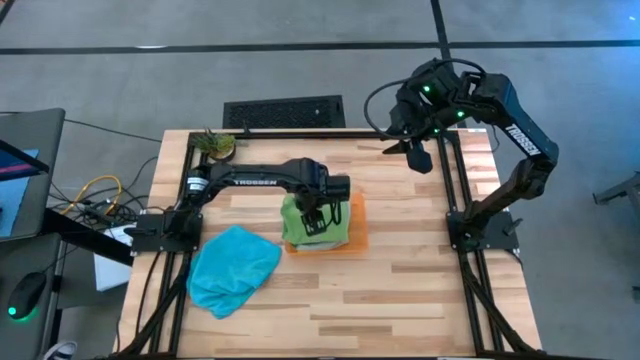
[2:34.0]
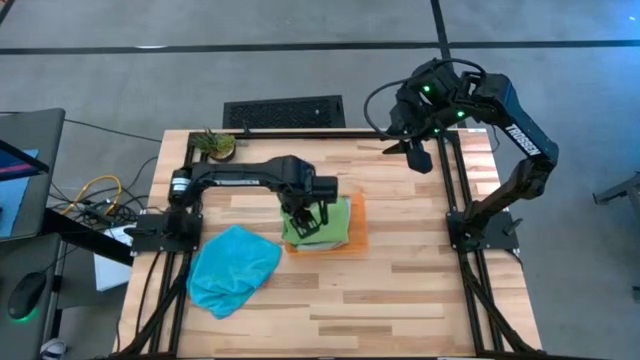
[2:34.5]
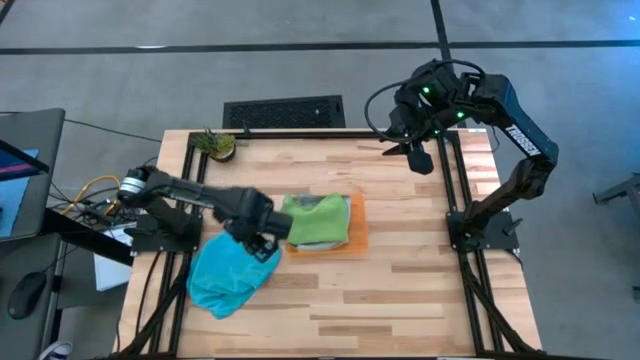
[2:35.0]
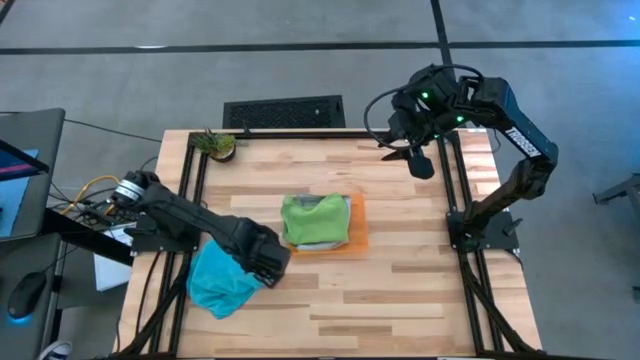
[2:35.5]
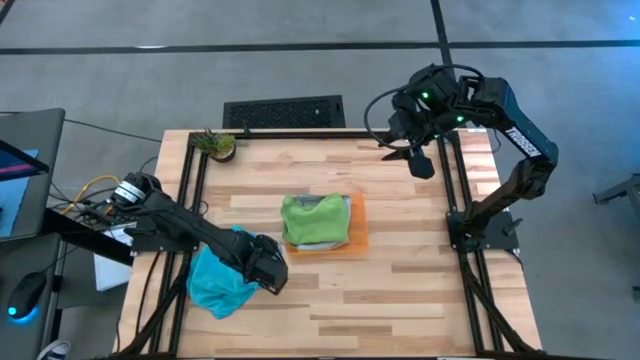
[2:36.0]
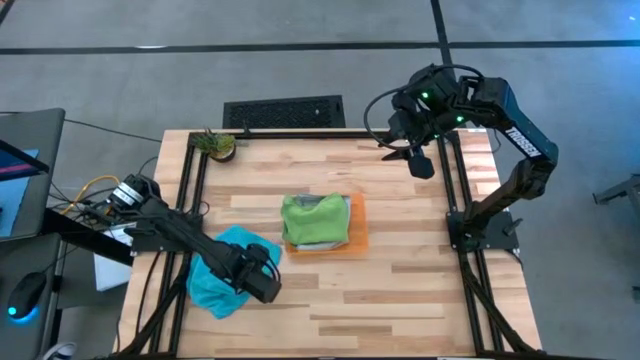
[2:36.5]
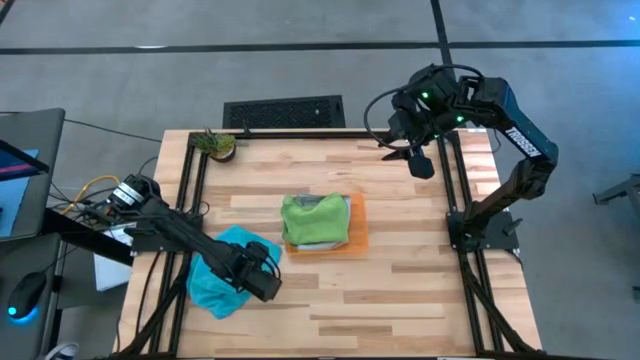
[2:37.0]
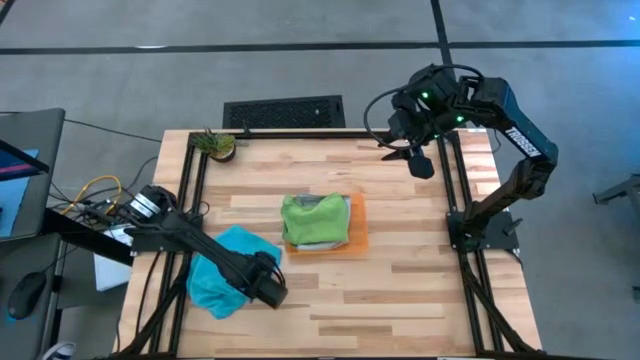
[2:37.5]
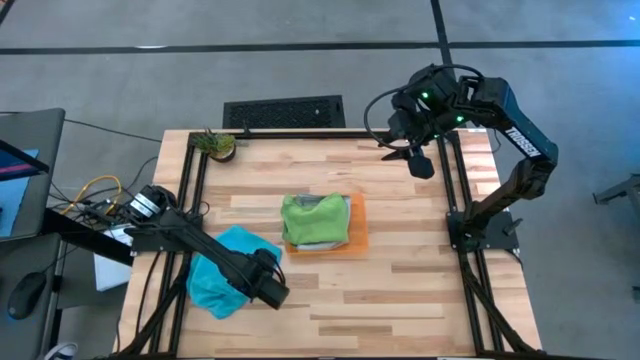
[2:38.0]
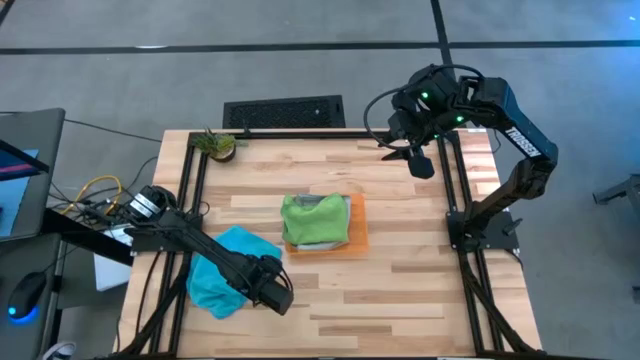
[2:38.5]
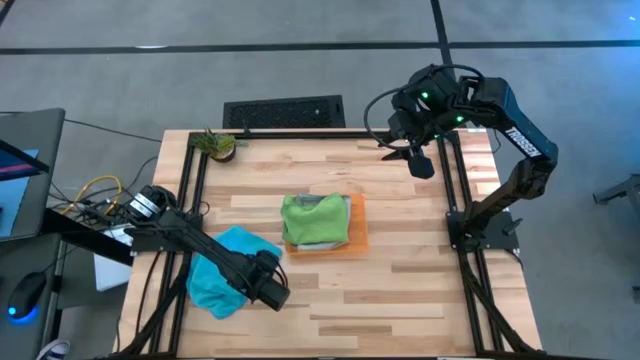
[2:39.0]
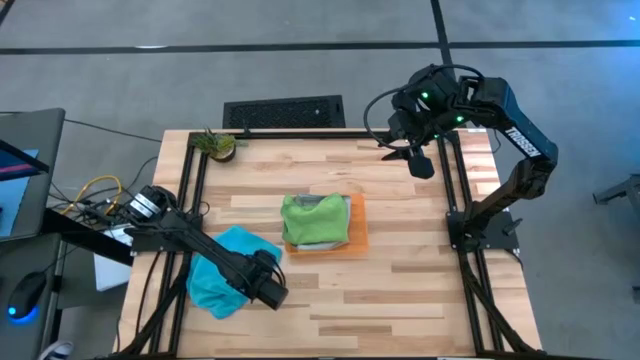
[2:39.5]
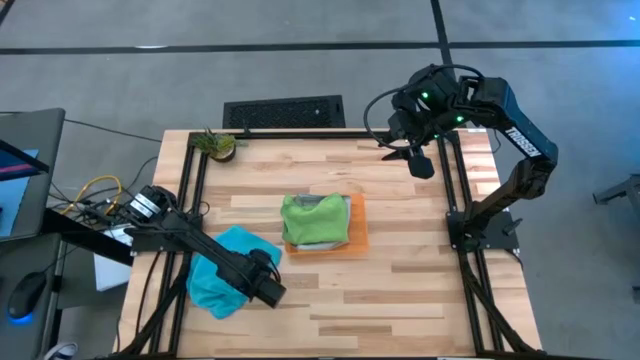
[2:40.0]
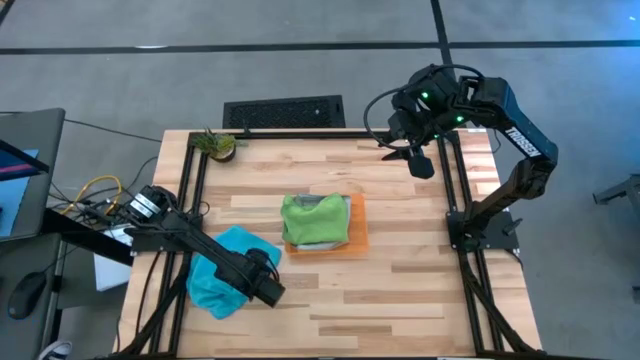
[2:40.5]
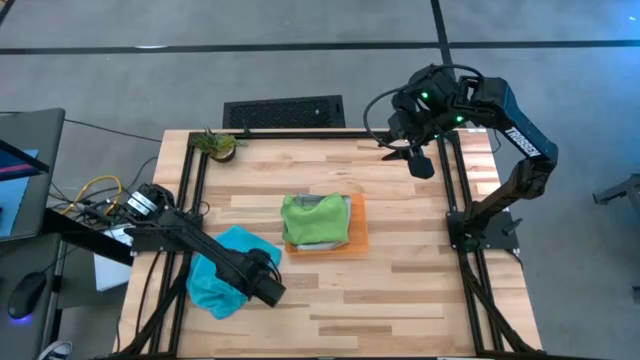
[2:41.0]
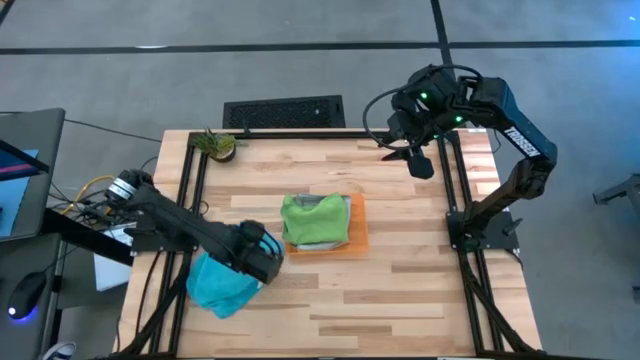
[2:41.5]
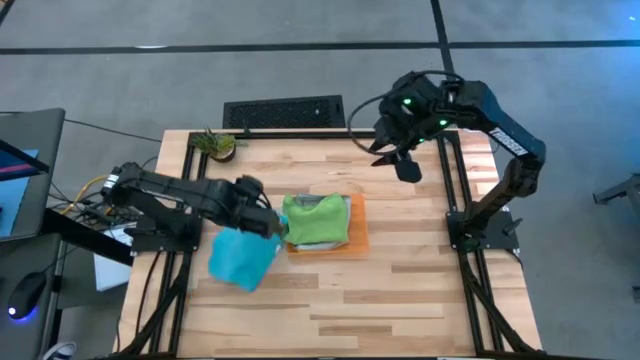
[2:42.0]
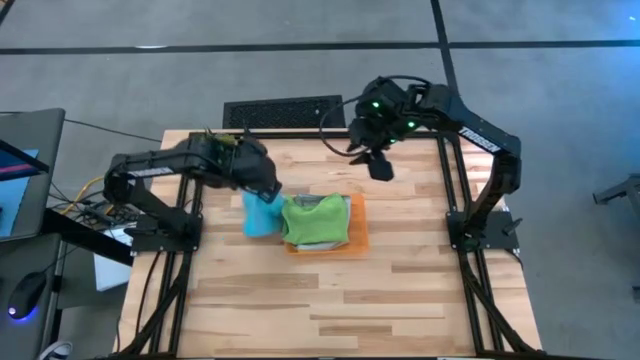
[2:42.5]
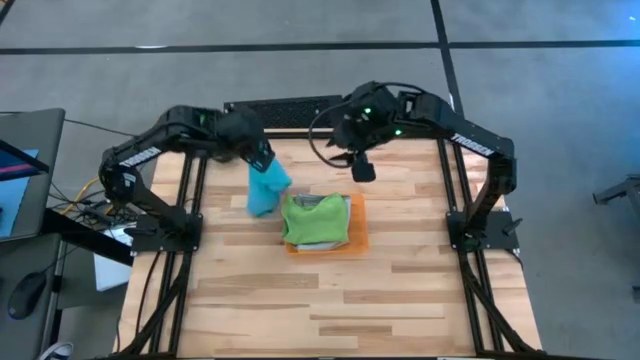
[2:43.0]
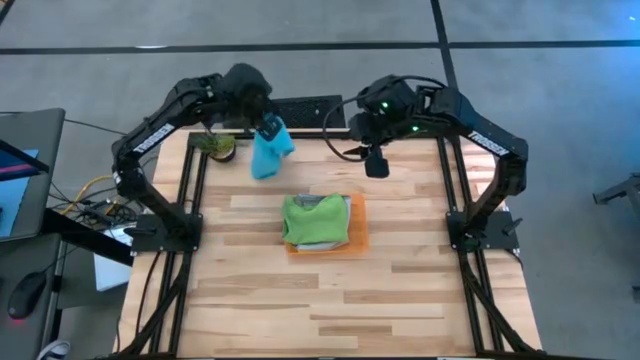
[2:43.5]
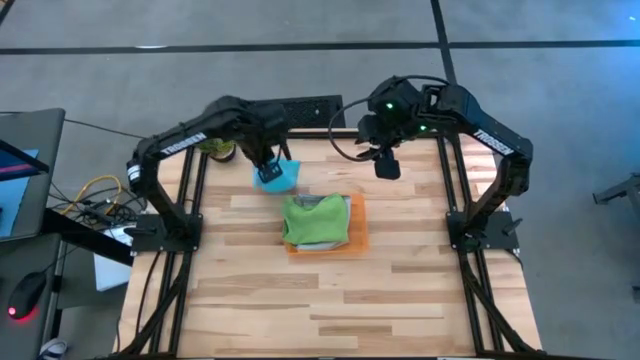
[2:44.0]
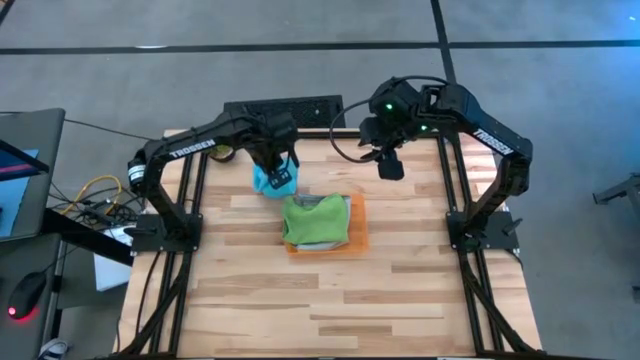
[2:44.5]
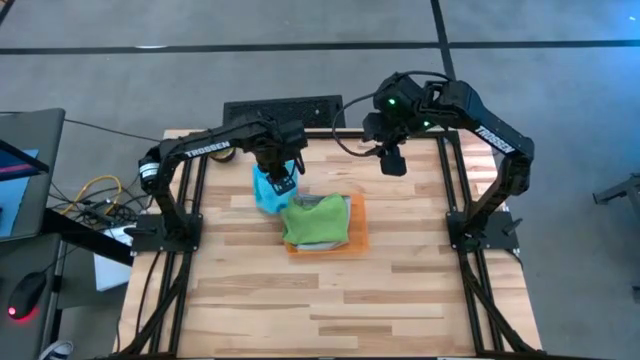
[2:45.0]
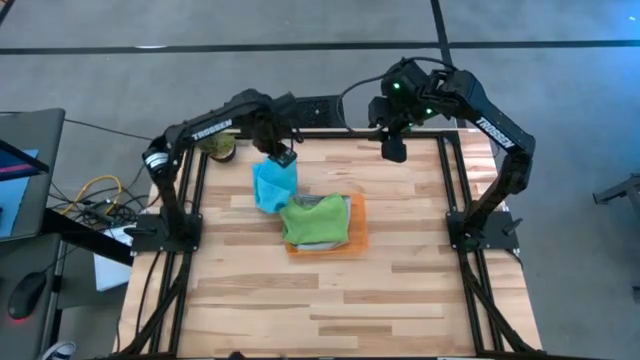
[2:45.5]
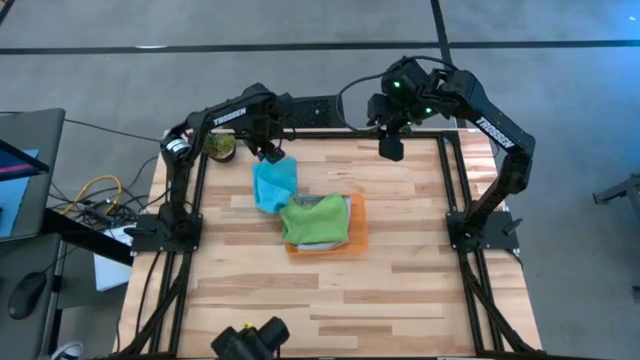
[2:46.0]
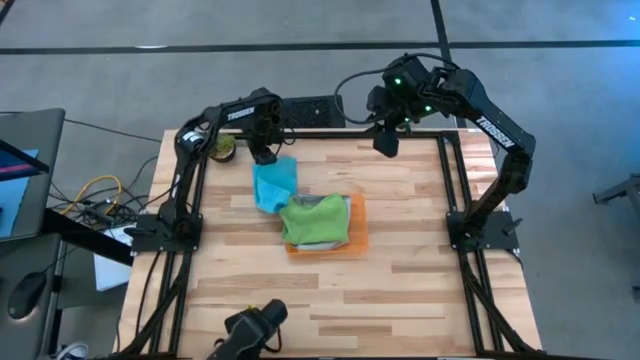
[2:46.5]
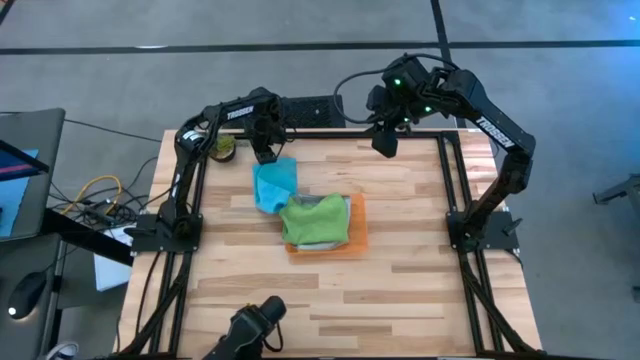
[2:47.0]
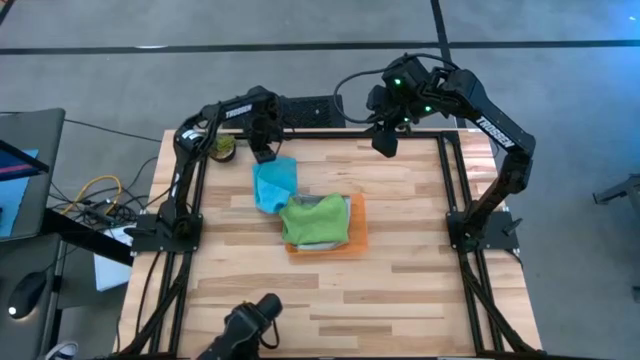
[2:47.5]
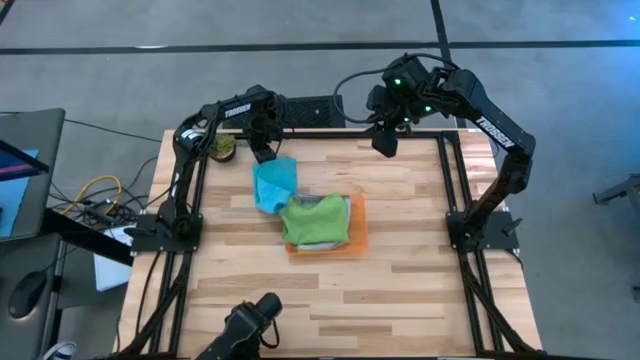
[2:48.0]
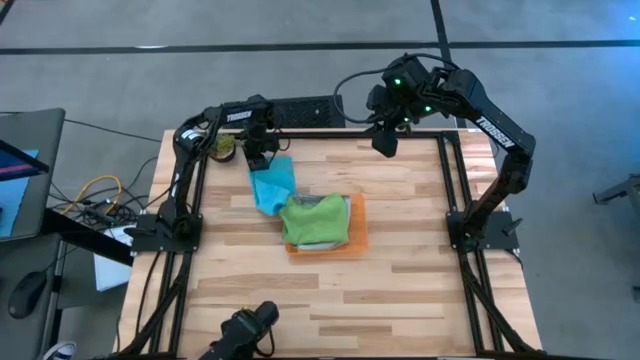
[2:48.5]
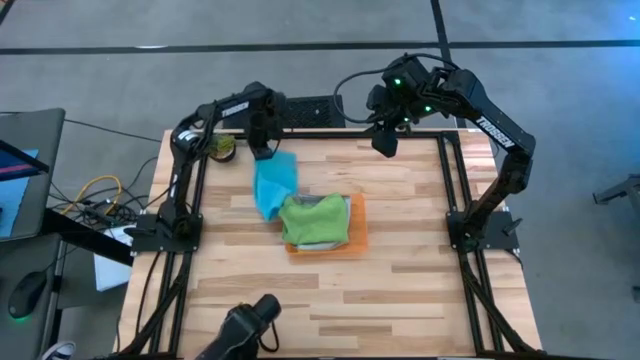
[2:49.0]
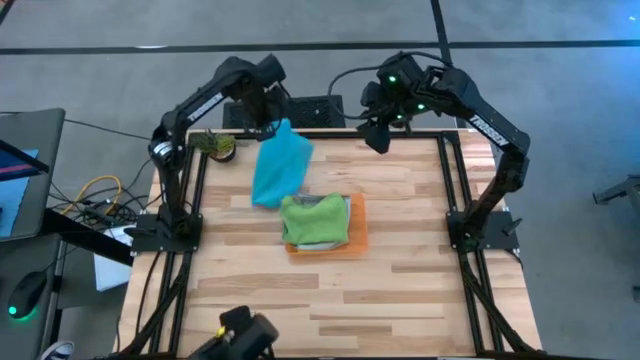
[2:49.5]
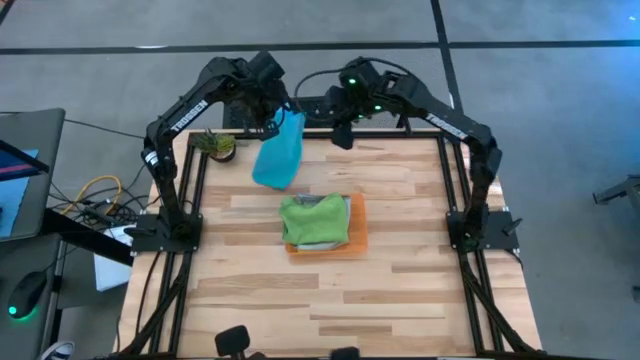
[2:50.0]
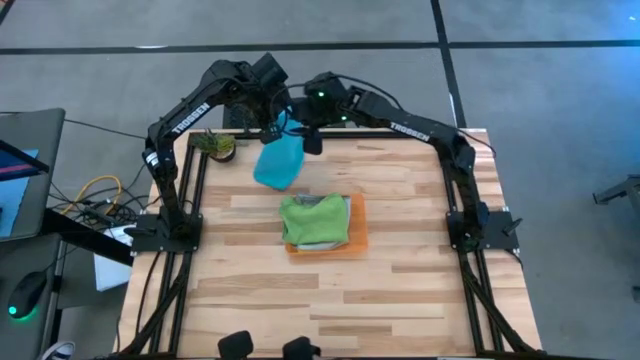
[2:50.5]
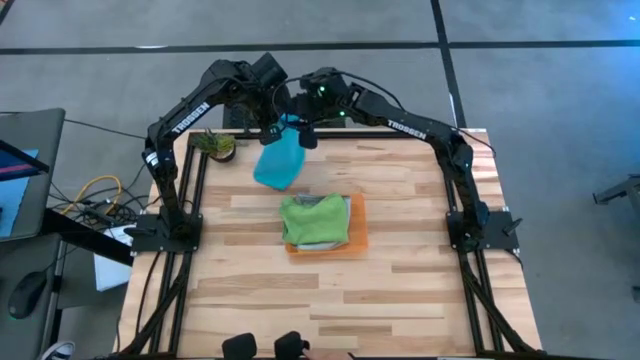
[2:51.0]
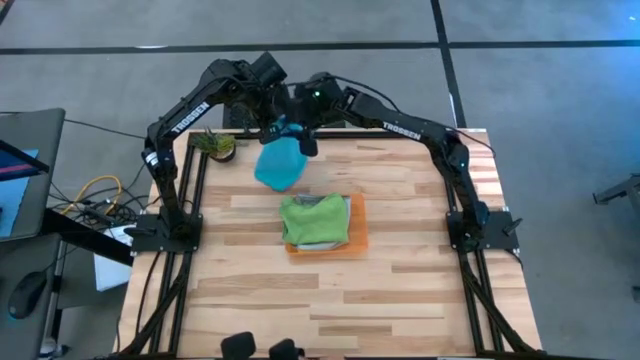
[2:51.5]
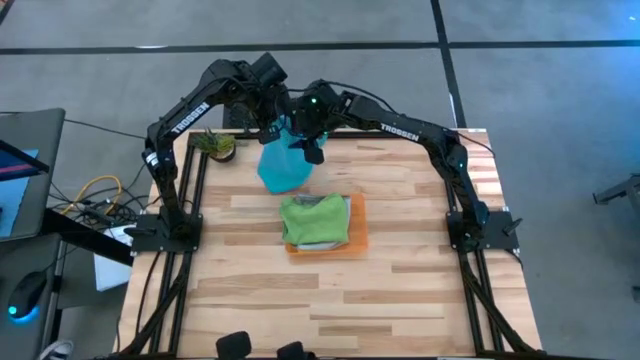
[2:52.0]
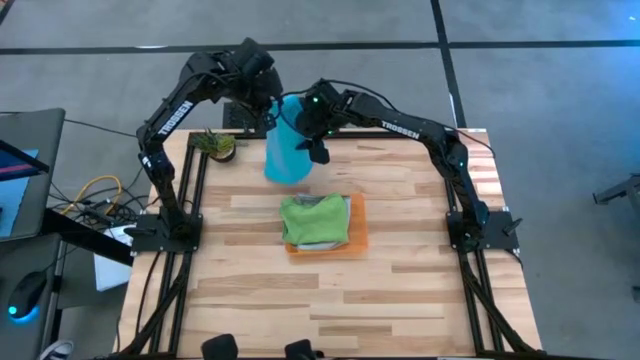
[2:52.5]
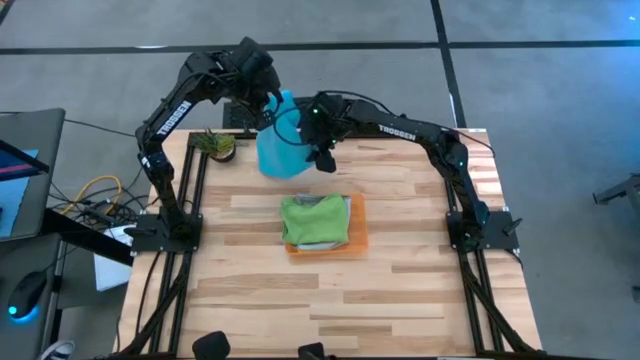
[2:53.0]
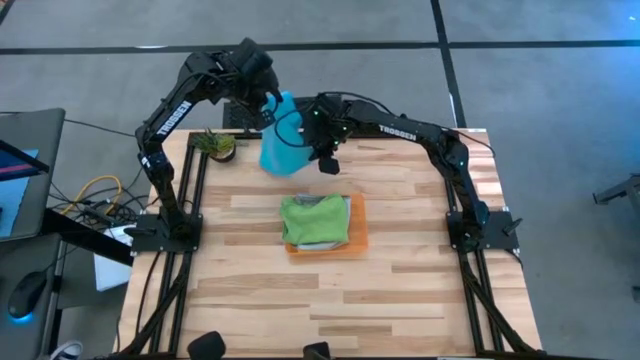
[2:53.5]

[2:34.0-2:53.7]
Task: Sort microfiber towel by color & place in baskets
Fold the blue towel

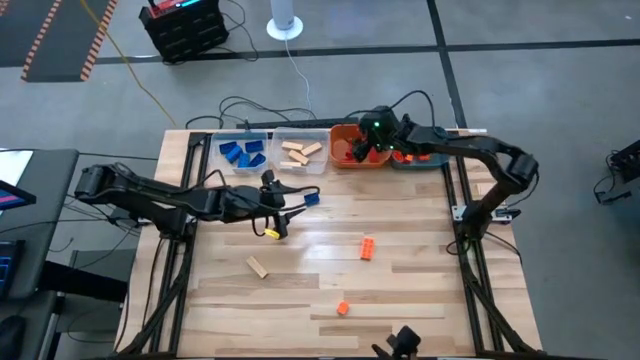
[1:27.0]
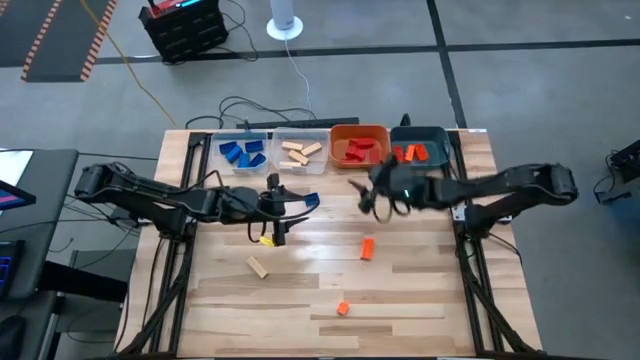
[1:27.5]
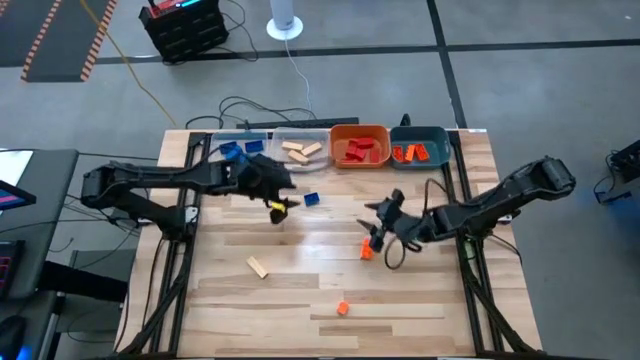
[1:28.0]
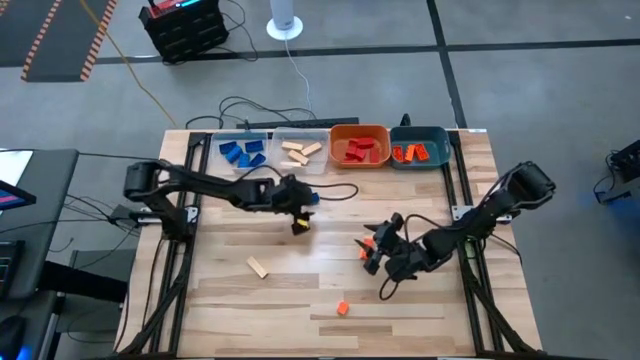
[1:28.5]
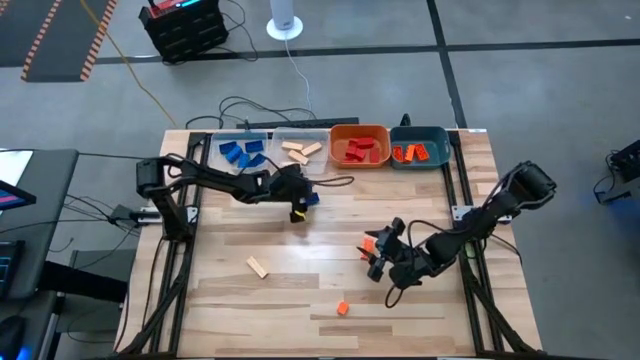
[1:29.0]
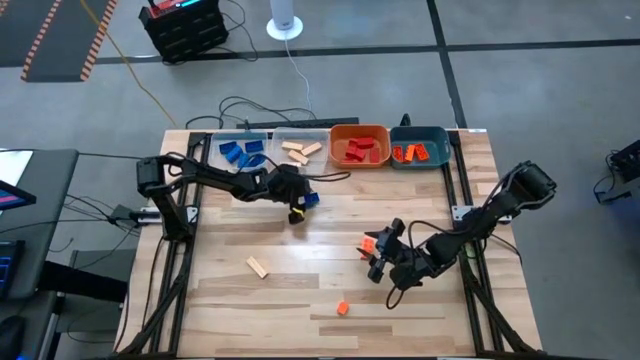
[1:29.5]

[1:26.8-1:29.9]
Task: Sort blocks
Put the blue game piece into the left transparent bin
